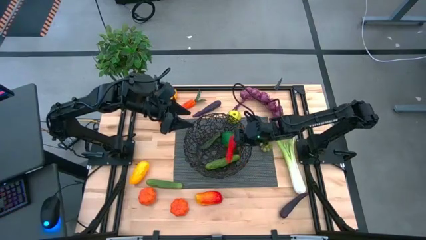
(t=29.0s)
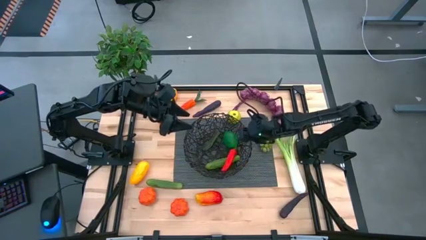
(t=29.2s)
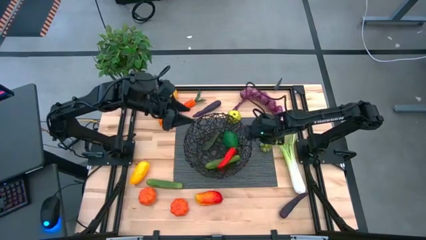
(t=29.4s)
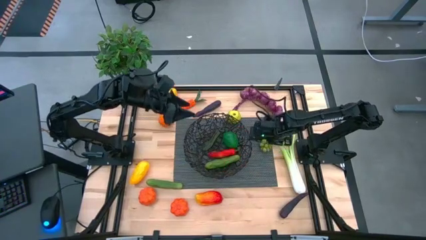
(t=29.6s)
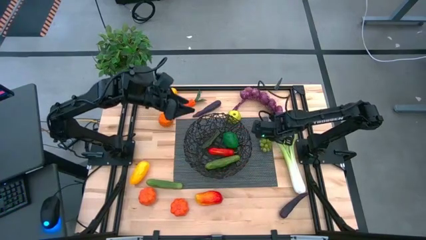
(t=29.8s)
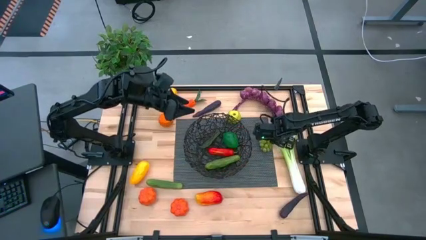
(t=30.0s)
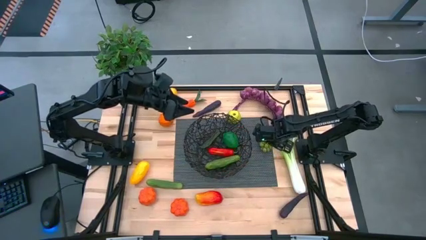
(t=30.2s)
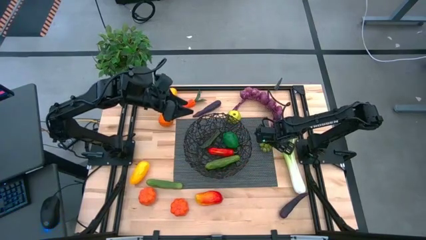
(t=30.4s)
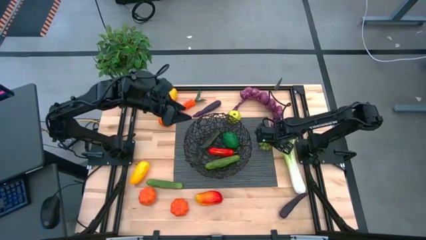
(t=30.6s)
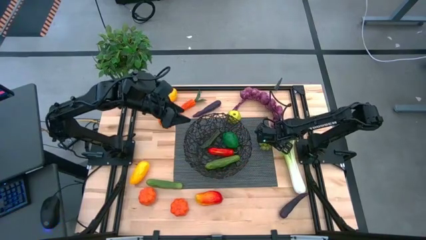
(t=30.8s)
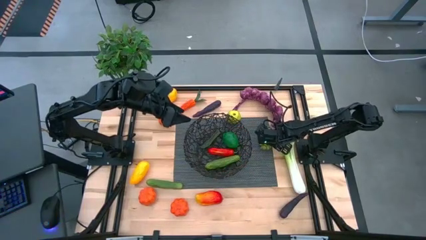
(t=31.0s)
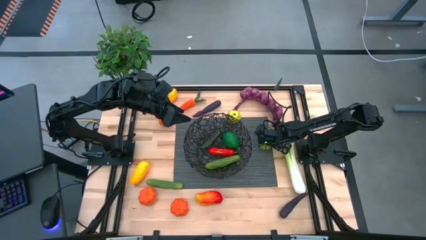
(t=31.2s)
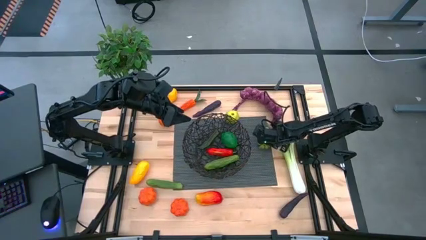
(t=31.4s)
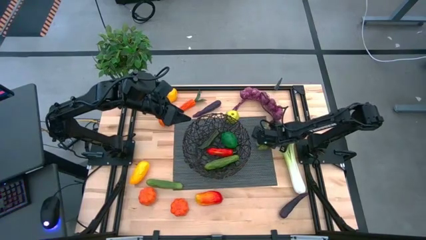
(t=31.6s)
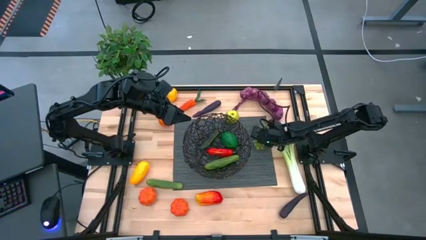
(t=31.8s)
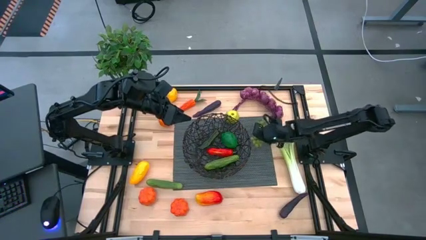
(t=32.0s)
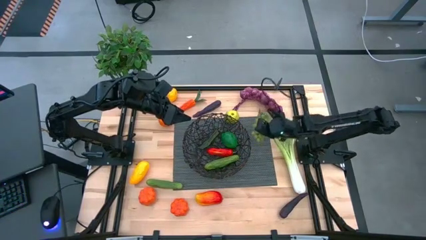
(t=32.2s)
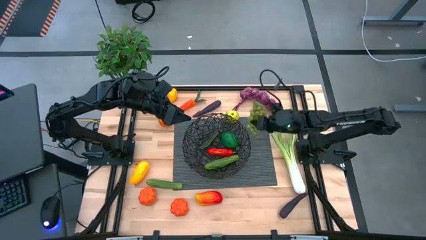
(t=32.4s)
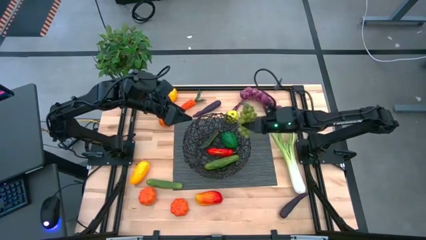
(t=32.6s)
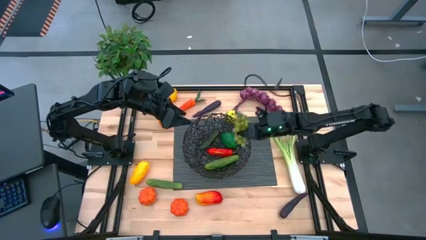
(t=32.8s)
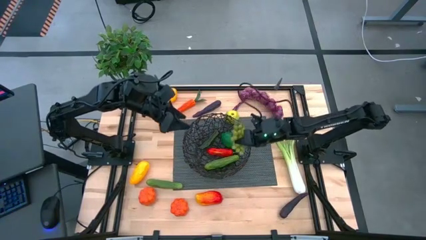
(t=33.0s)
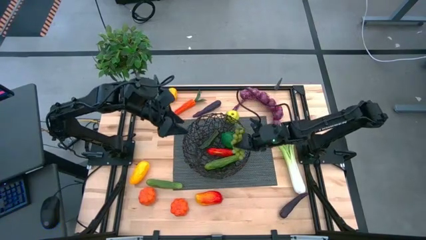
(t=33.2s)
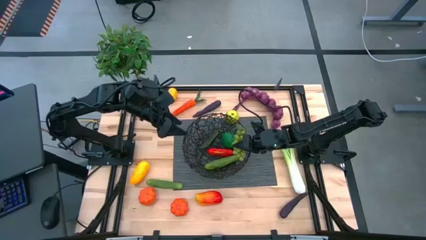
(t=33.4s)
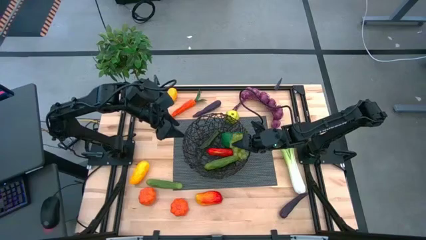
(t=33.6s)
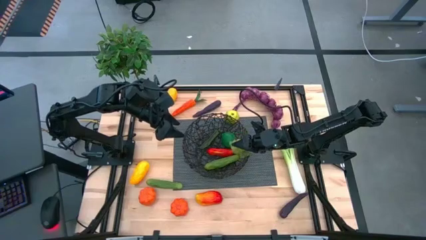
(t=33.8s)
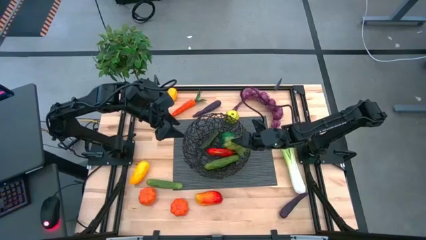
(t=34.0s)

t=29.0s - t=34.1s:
Task: Build produce basket
Put the grapes into the black basket

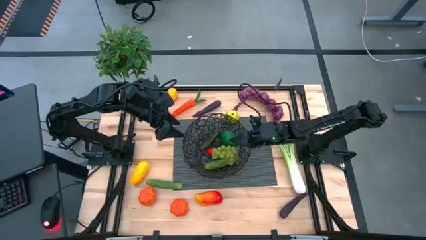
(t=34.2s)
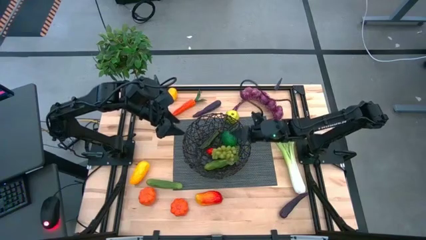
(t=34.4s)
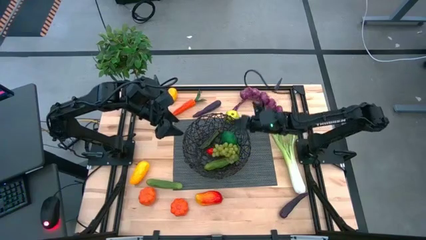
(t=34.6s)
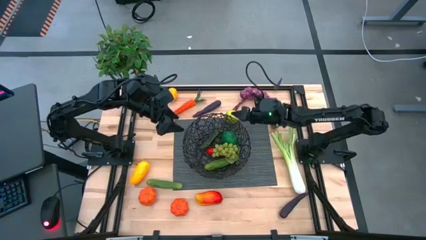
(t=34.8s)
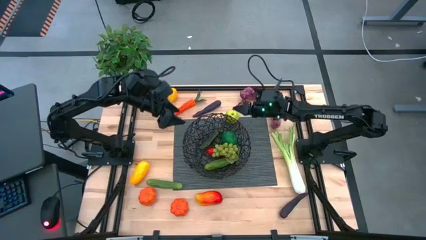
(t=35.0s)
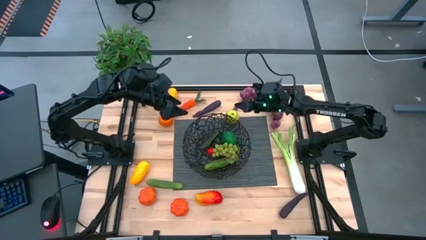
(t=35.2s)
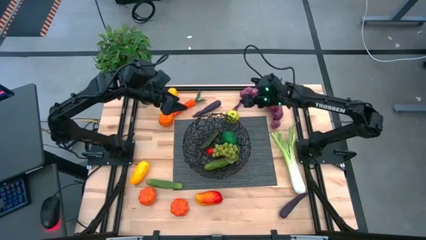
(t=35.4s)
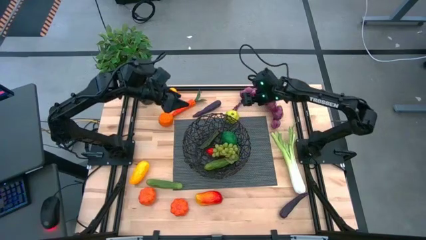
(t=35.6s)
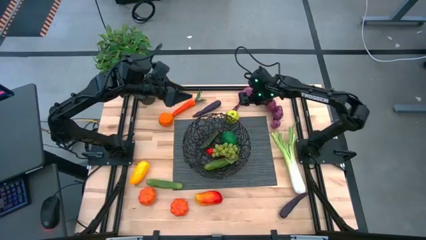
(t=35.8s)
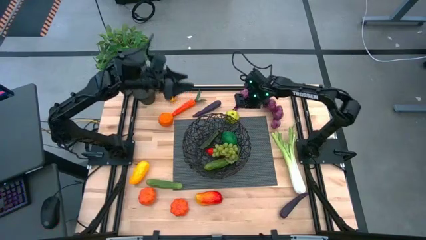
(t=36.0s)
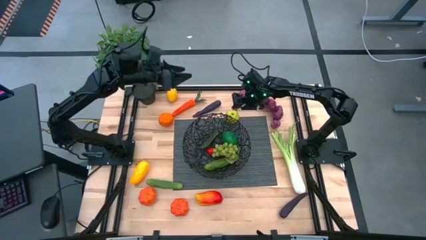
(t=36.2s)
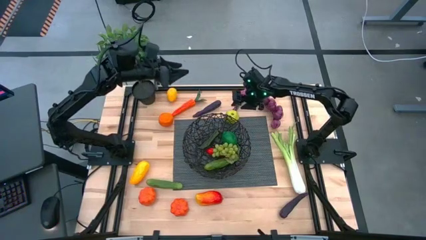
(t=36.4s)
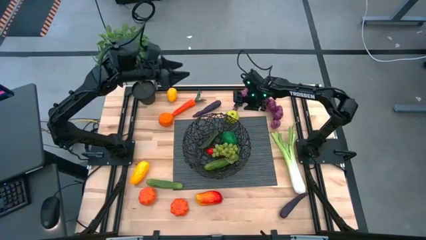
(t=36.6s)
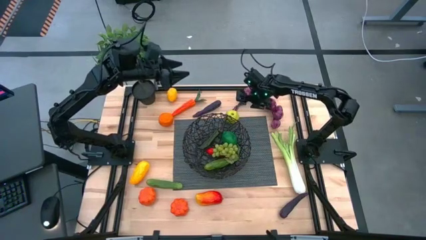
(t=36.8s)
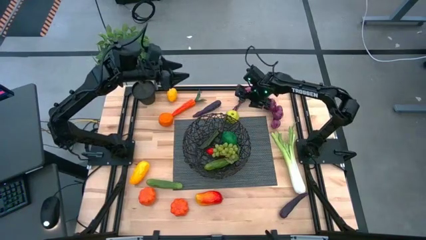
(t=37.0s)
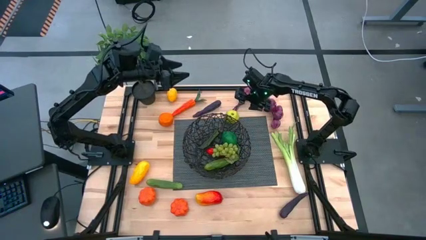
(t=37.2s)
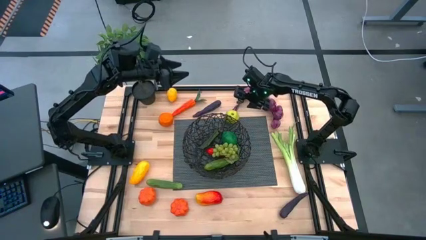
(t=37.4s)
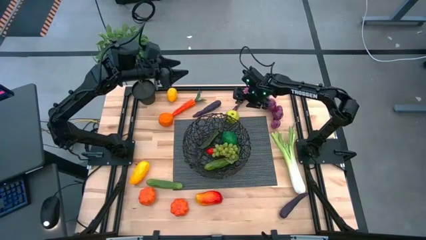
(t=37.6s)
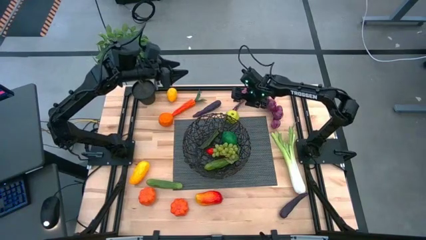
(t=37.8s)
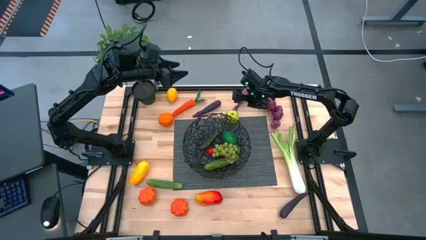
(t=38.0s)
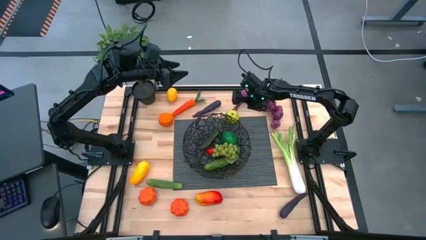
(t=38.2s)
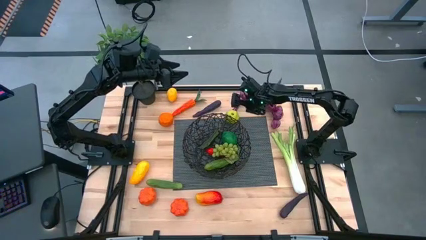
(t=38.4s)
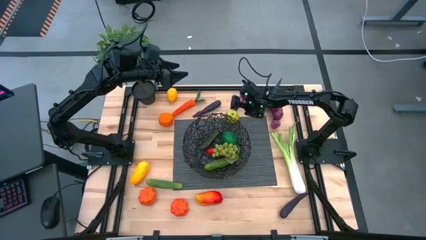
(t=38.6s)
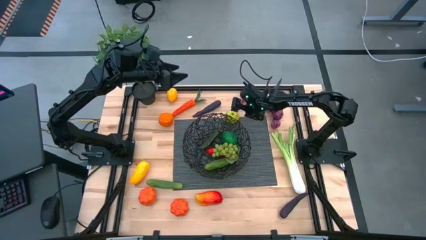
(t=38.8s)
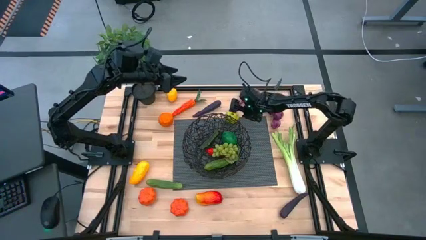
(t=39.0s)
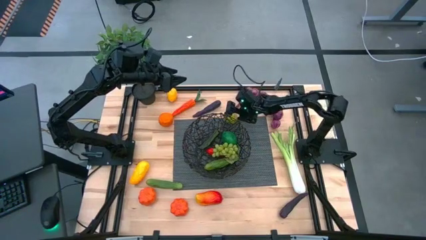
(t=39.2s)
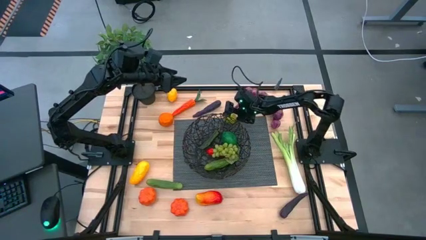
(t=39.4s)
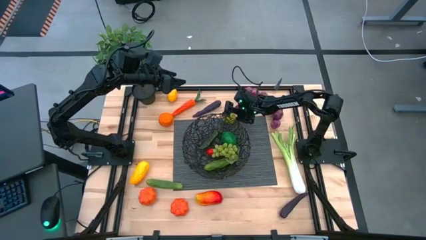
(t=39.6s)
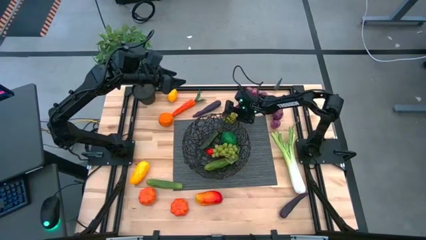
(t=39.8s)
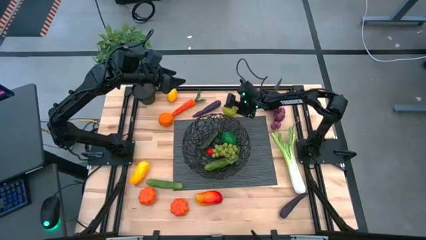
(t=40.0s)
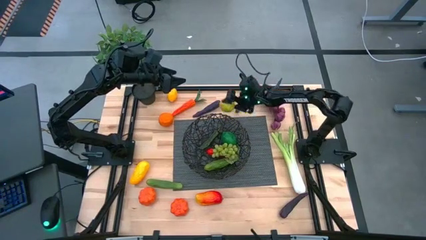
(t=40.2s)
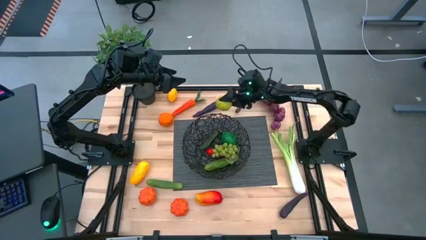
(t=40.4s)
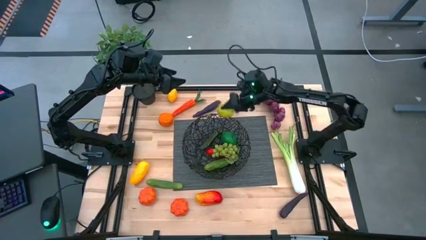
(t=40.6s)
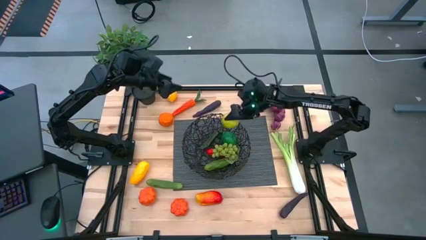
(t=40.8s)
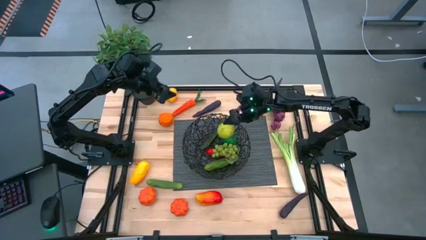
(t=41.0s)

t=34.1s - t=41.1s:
Put the green apple into the black basket

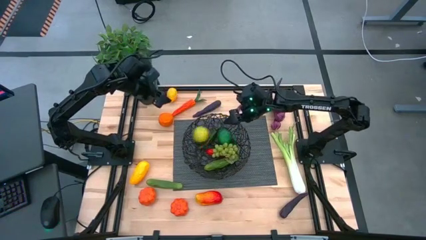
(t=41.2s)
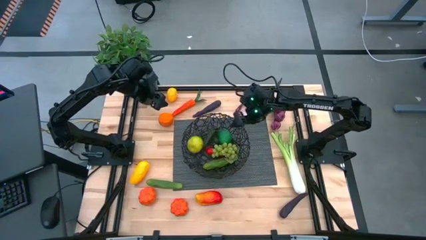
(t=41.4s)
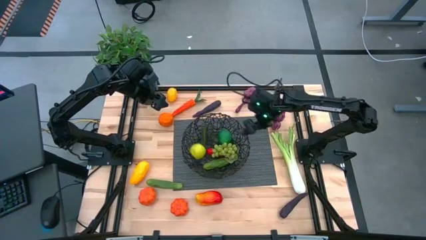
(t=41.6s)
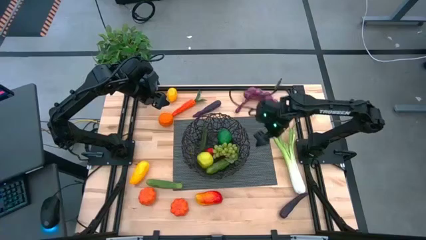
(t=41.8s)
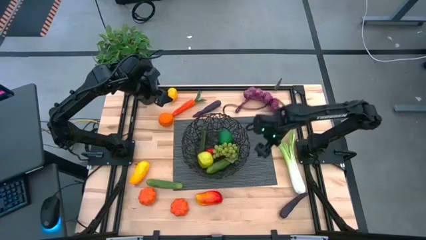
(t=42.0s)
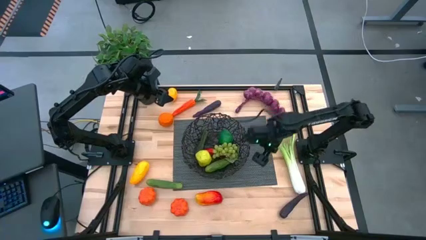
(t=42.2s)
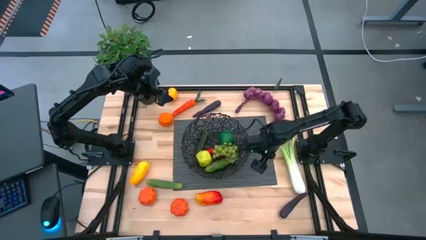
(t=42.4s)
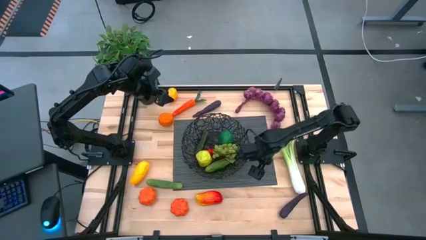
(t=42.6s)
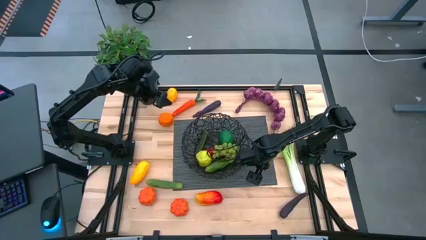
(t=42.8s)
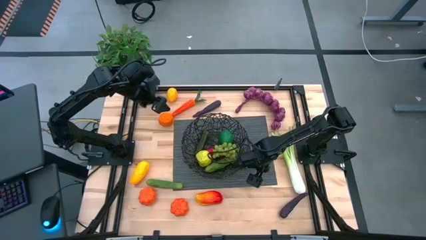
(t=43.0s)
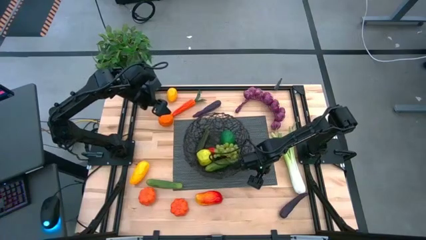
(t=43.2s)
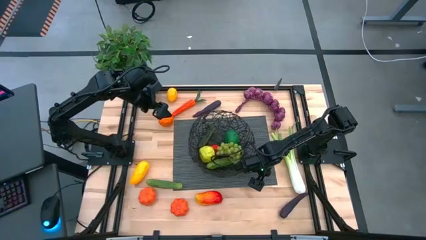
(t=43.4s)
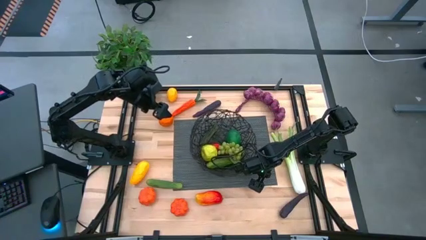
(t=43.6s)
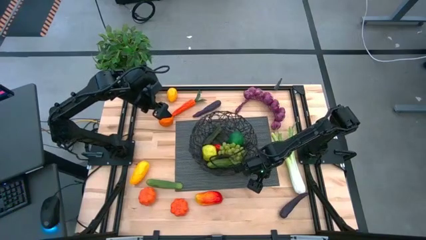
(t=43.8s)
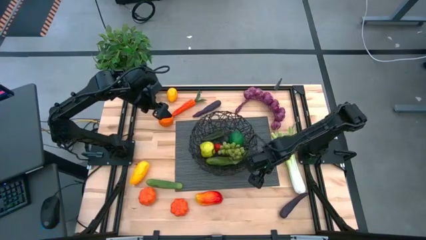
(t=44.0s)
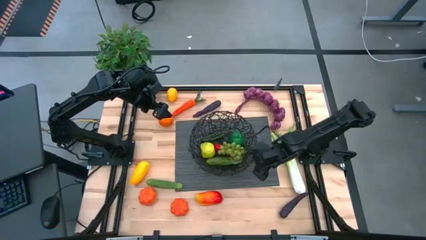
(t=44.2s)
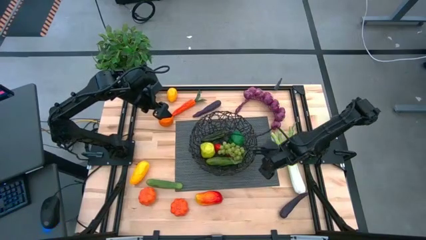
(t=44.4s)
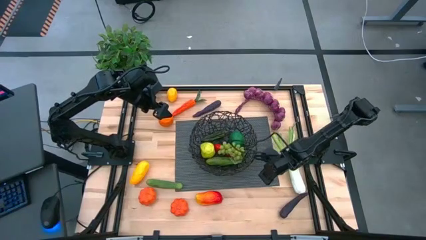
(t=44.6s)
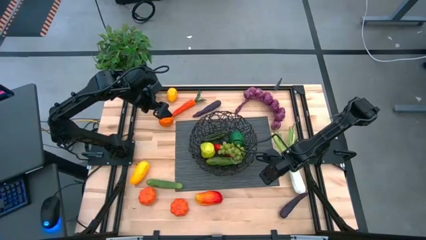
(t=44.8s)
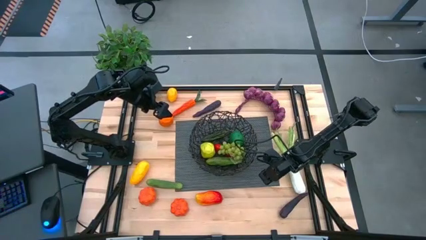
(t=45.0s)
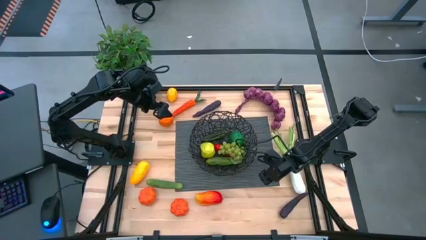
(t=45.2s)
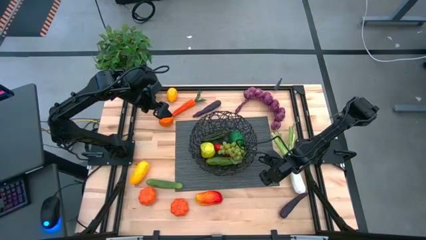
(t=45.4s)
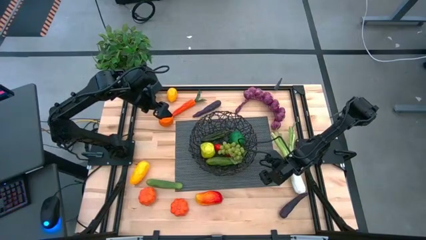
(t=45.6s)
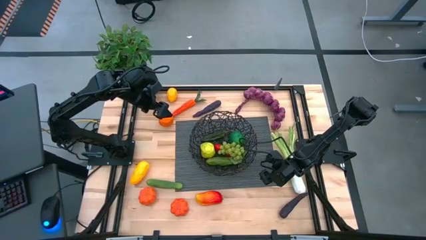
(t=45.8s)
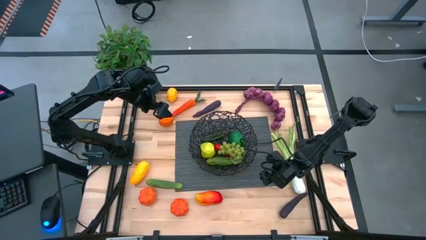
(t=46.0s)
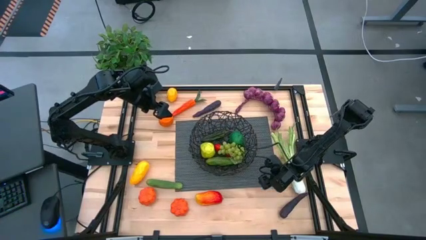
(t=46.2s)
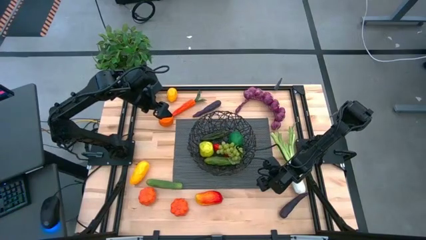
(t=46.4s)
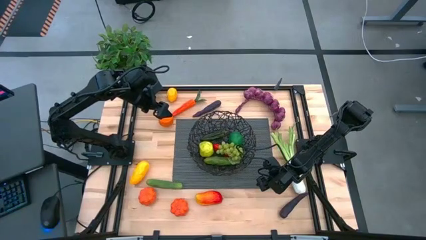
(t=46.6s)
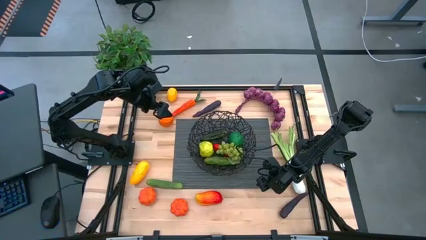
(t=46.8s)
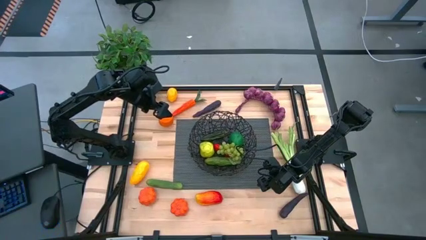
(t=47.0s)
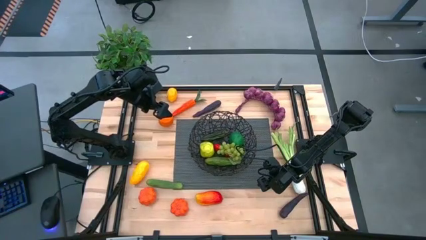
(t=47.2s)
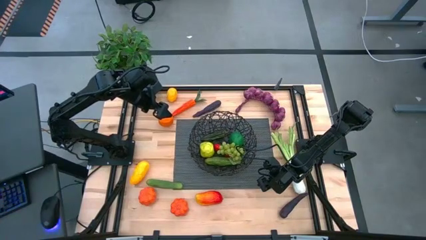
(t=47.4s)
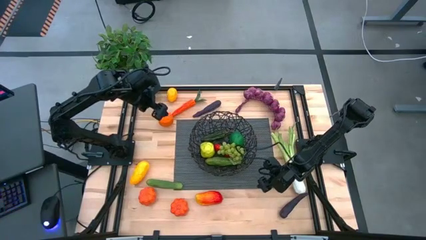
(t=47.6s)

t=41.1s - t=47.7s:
Adjust the black mat
